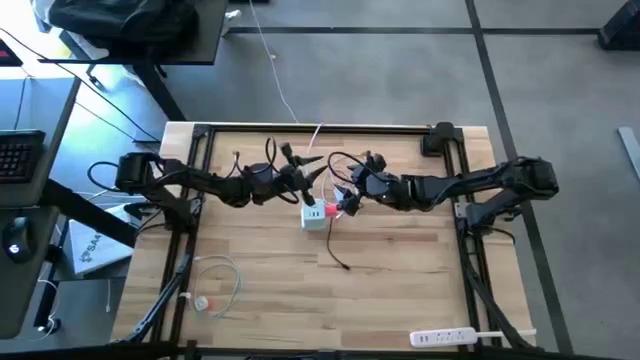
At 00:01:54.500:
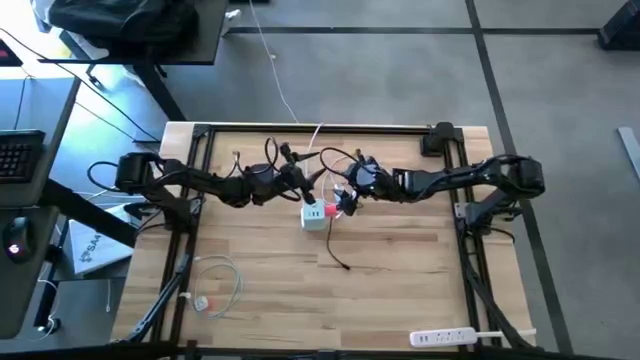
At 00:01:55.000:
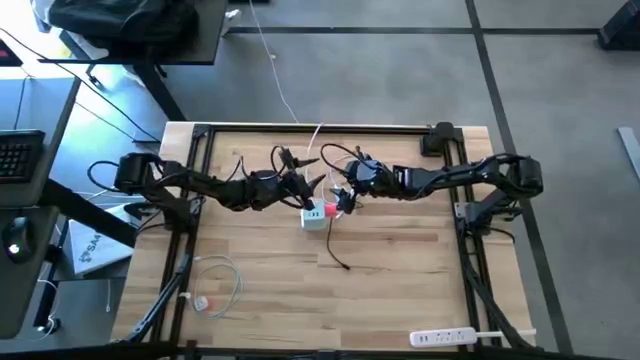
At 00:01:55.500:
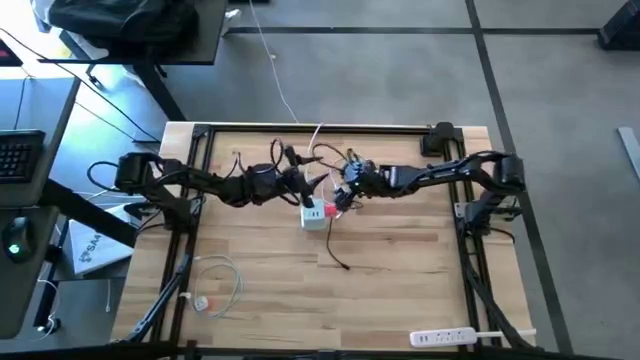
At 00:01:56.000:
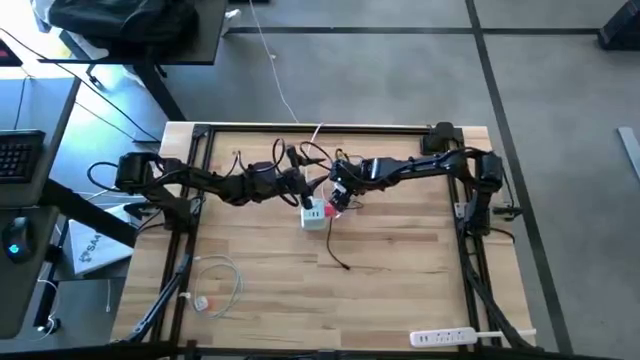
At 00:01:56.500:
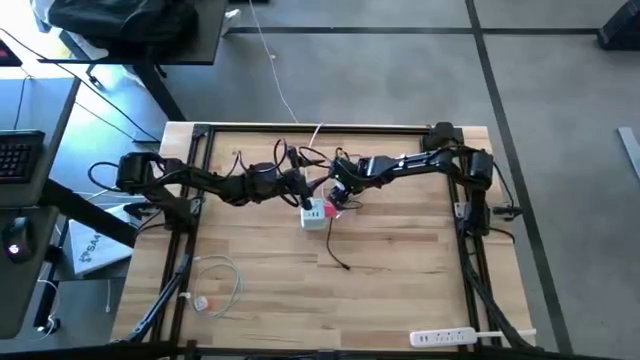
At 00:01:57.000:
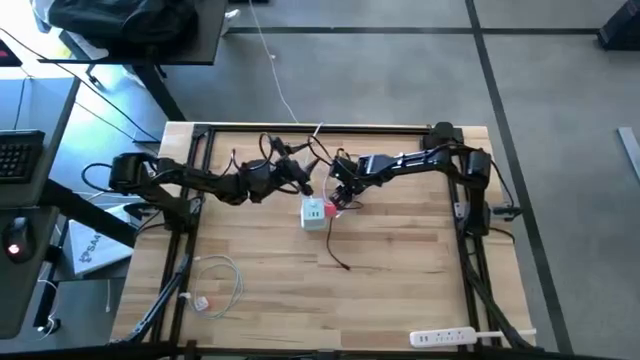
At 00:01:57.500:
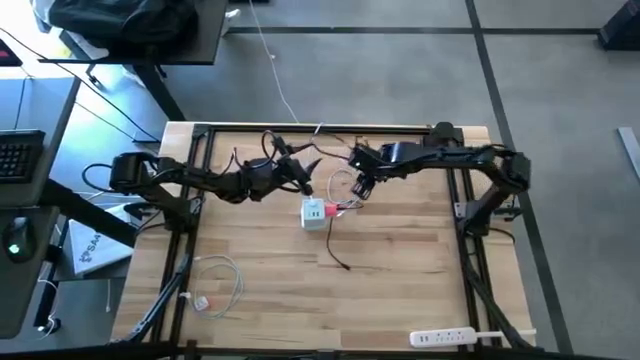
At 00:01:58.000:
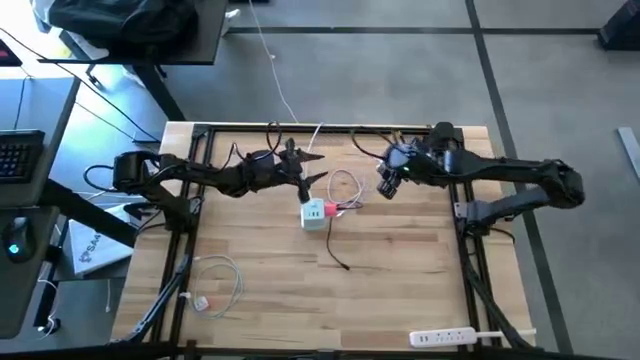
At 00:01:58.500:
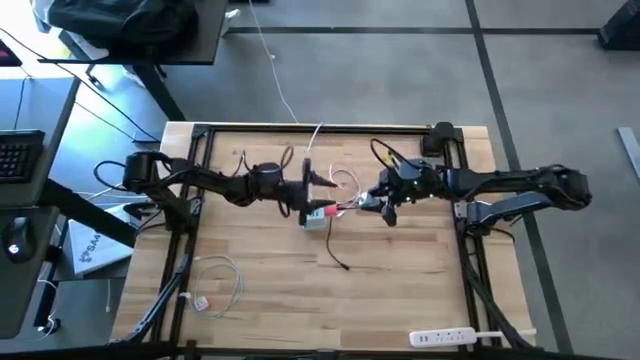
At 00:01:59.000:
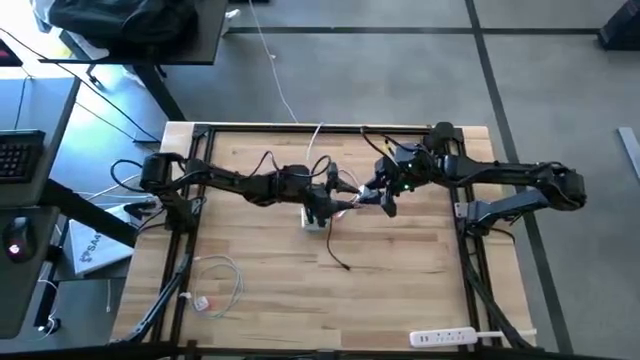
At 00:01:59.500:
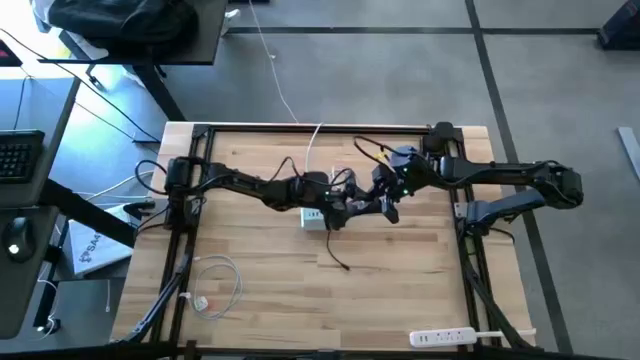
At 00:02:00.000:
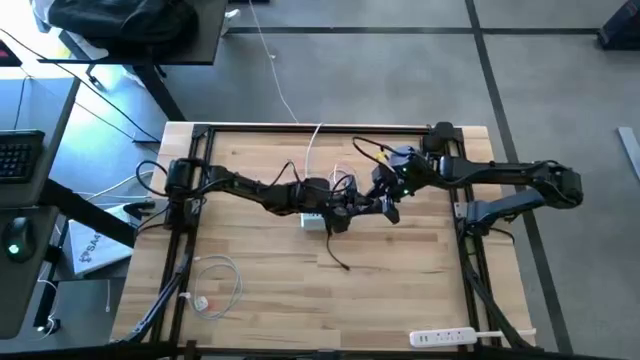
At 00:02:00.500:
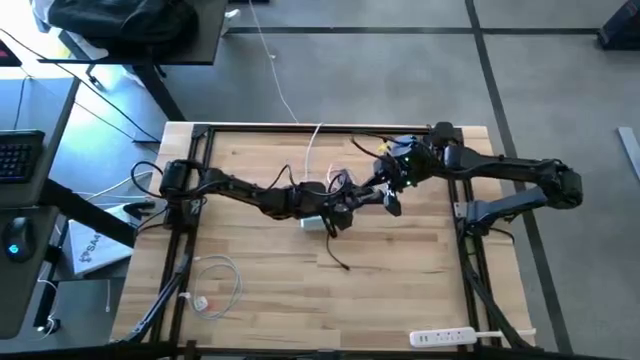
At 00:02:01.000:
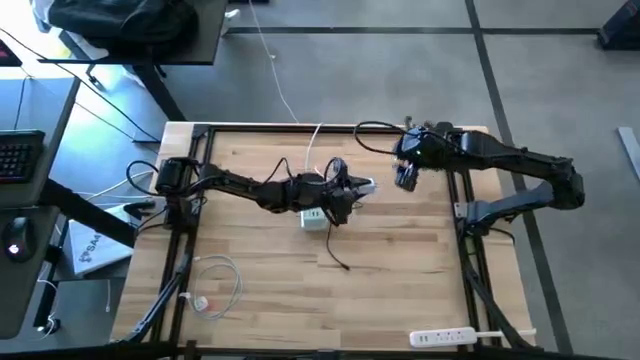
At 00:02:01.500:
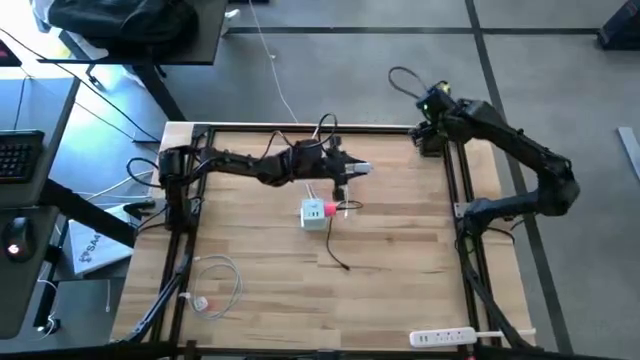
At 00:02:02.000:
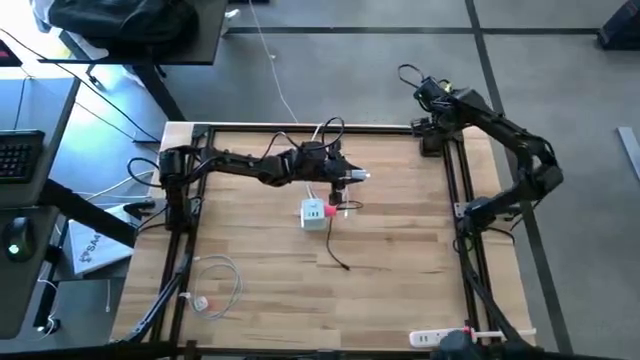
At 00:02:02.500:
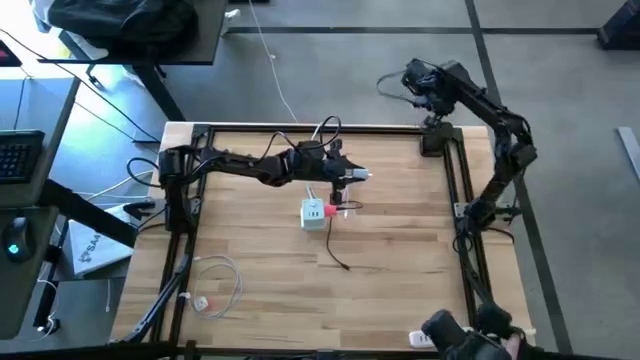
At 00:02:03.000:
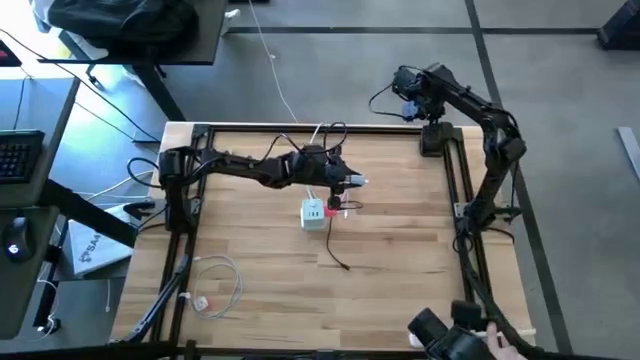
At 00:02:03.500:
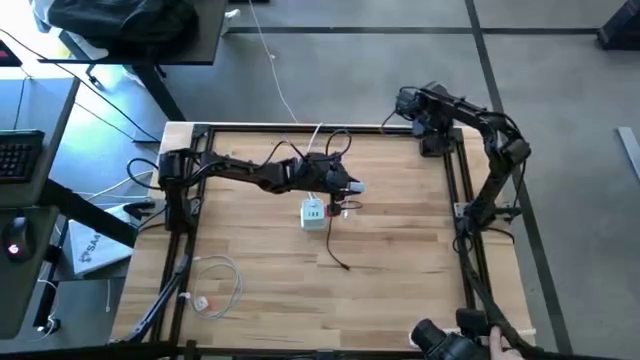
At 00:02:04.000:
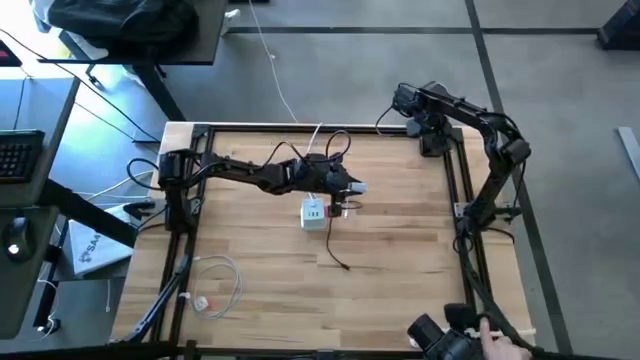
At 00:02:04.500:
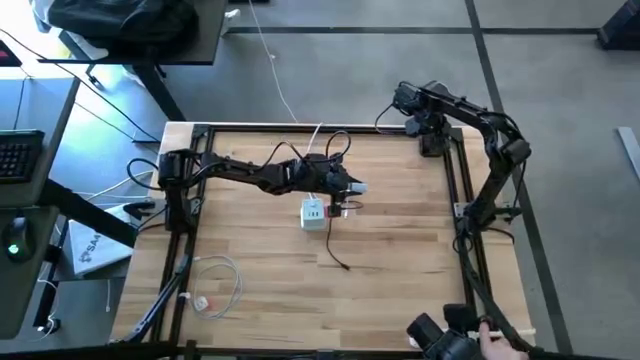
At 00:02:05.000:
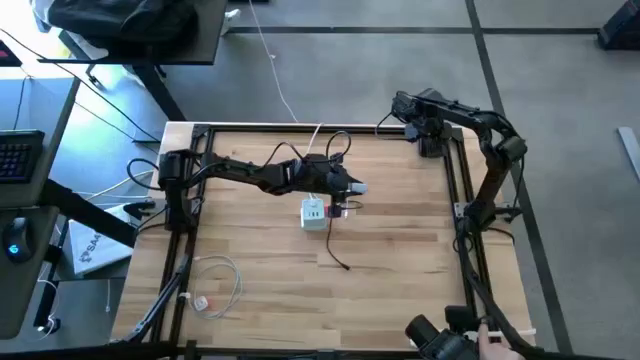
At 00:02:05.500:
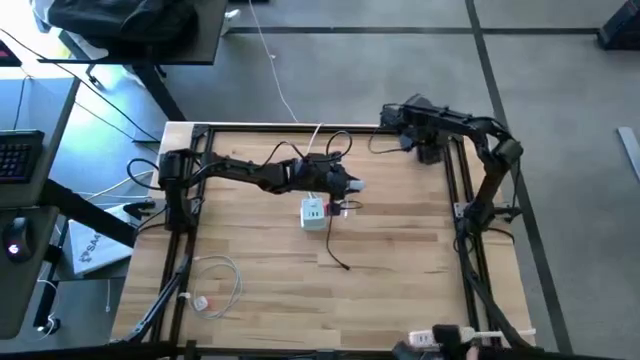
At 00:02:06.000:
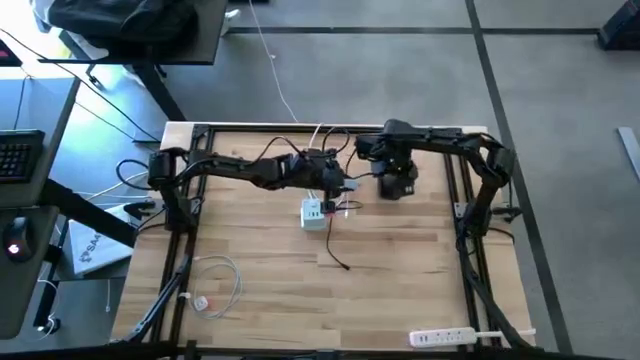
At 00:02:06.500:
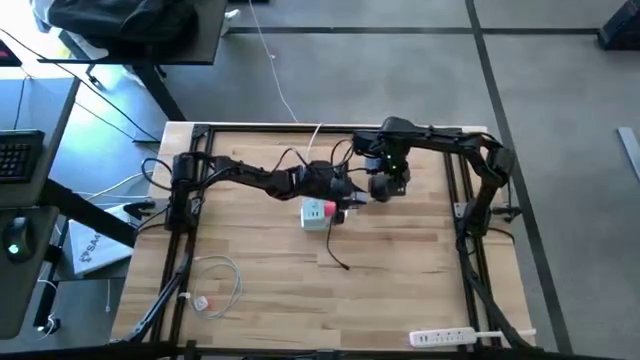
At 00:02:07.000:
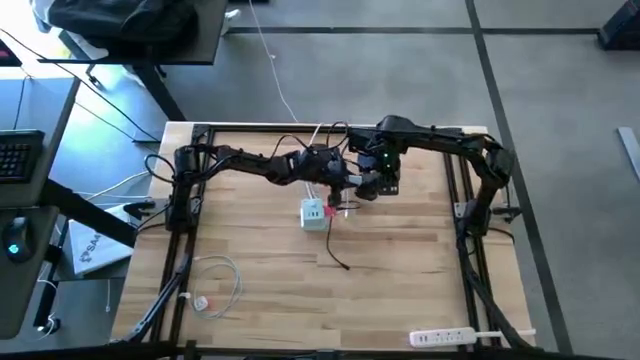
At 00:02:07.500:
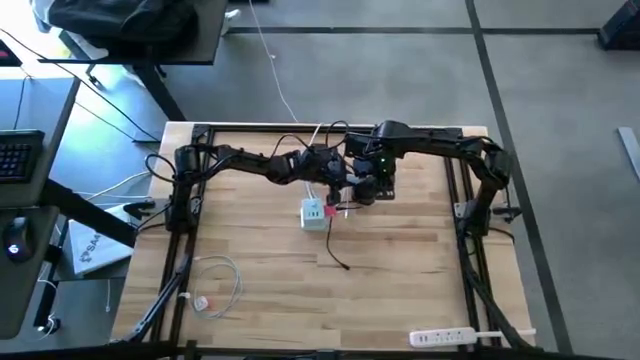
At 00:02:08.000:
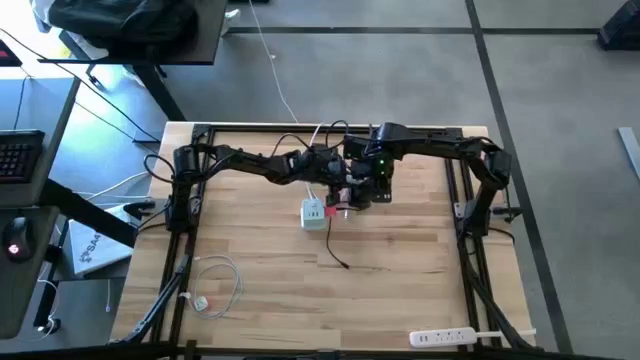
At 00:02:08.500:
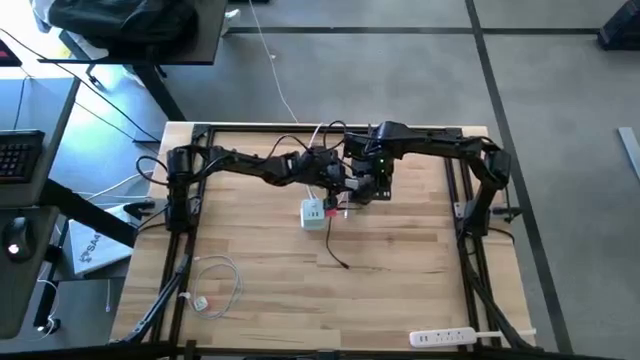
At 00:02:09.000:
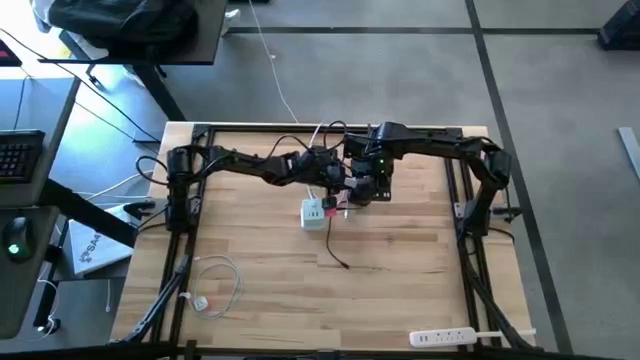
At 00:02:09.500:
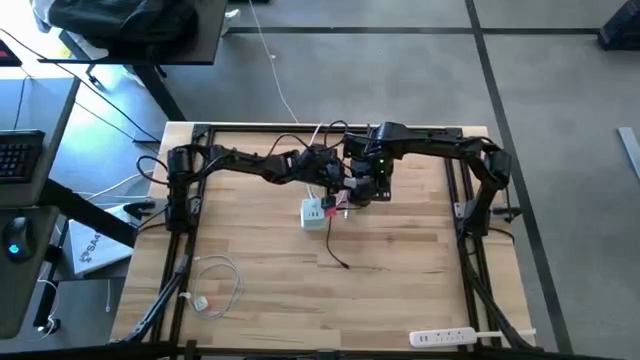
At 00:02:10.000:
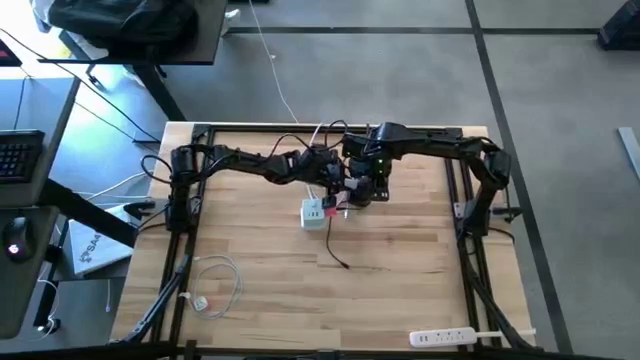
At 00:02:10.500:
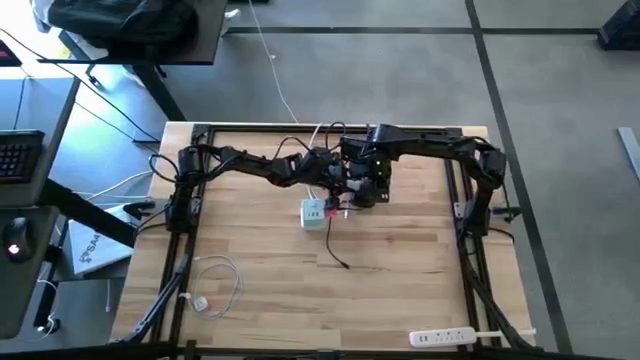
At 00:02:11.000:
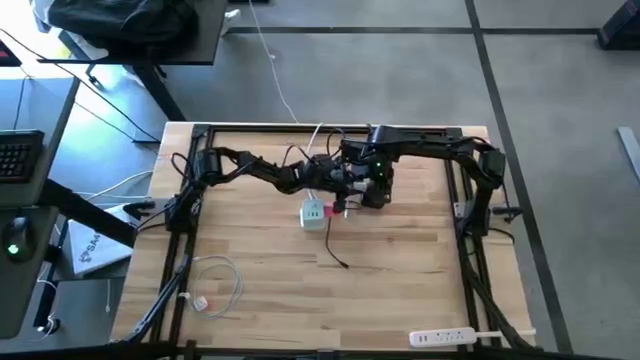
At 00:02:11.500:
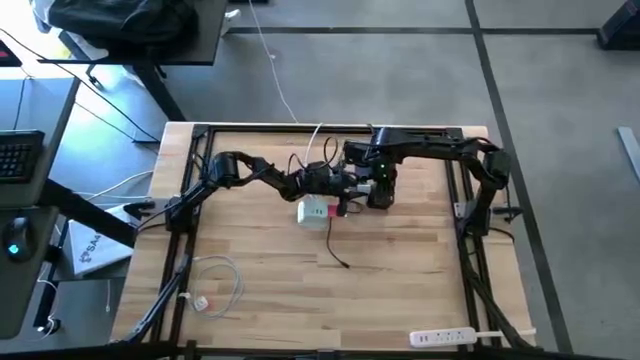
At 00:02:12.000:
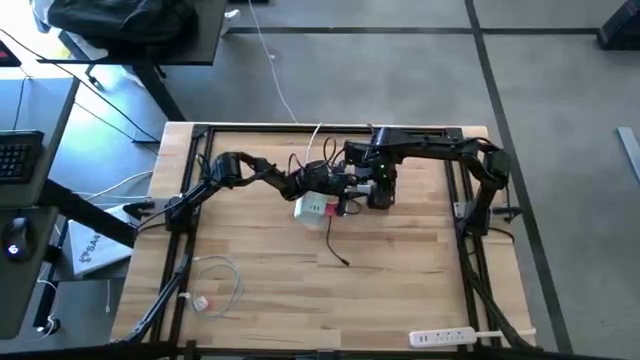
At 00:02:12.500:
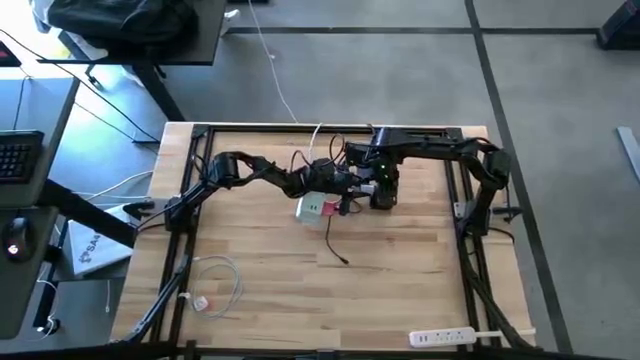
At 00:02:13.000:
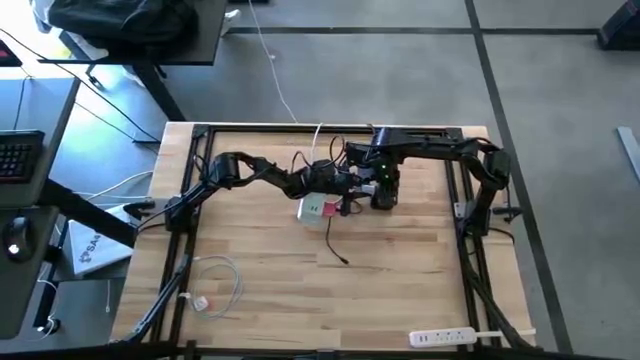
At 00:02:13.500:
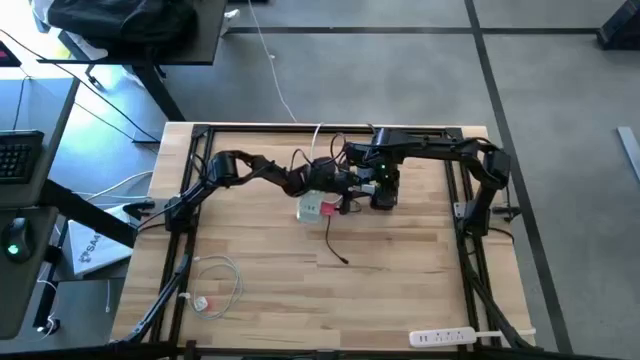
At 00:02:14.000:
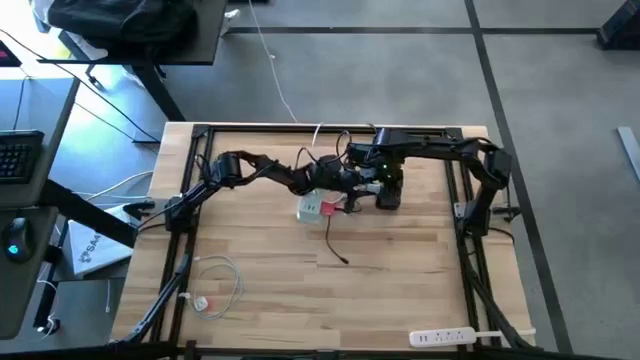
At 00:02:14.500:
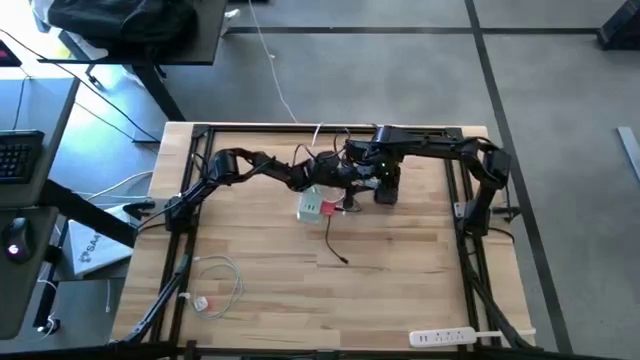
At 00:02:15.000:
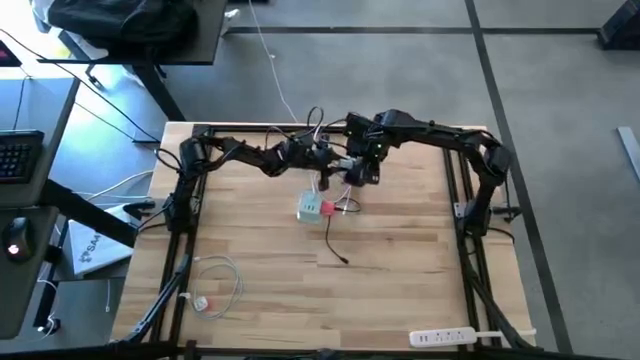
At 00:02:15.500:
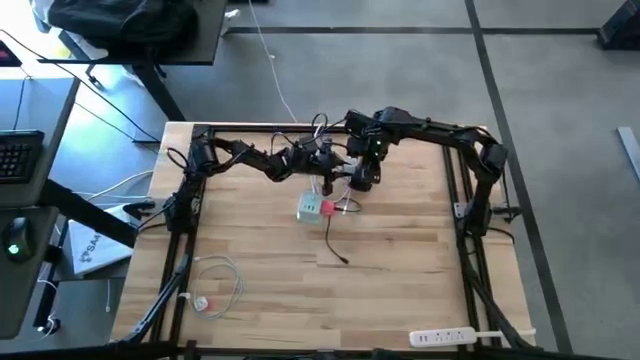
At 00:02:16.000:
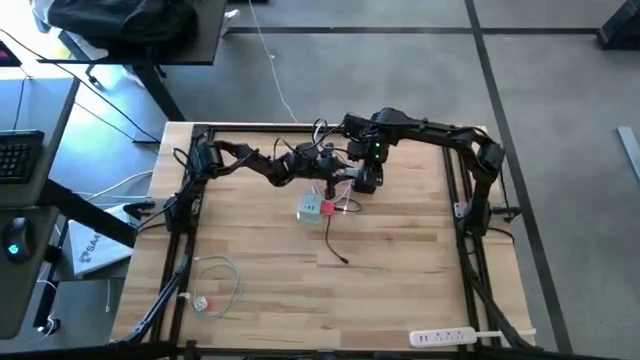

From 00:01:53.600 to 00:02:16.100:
Task: Insert USB
Insert the white charger adapter into the black outlet extension
